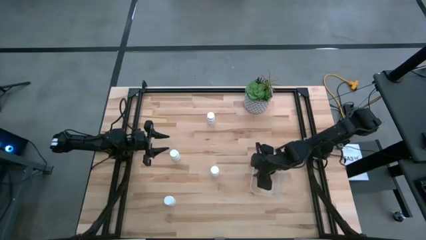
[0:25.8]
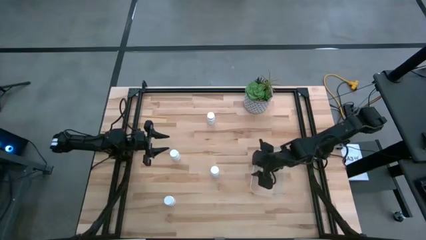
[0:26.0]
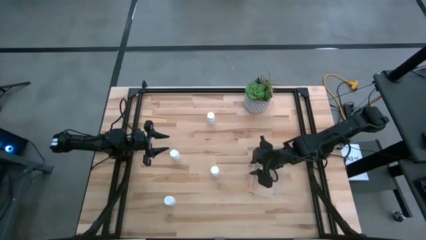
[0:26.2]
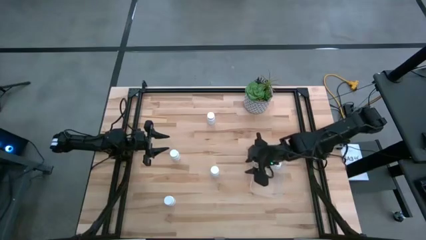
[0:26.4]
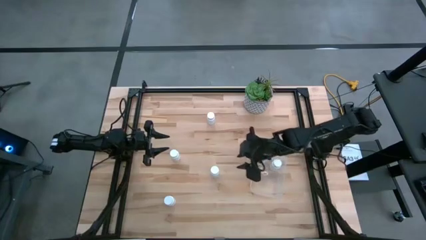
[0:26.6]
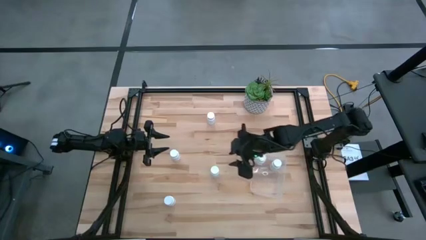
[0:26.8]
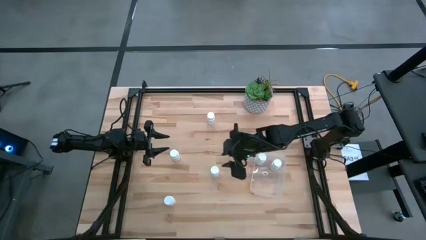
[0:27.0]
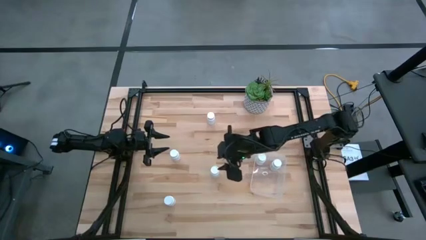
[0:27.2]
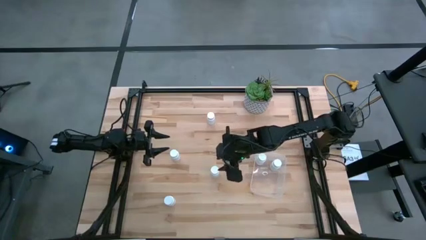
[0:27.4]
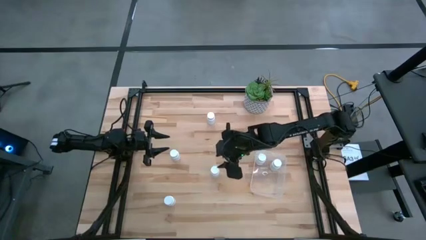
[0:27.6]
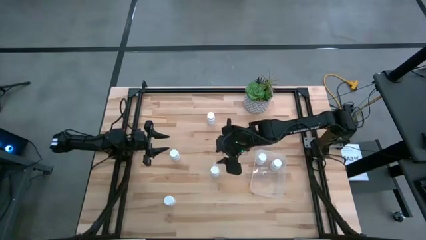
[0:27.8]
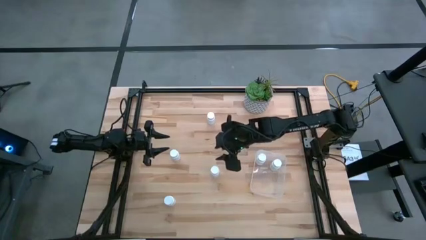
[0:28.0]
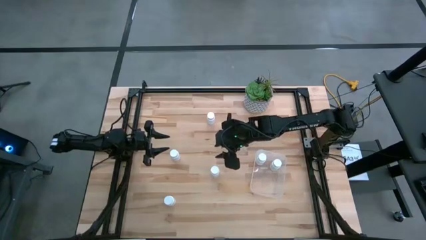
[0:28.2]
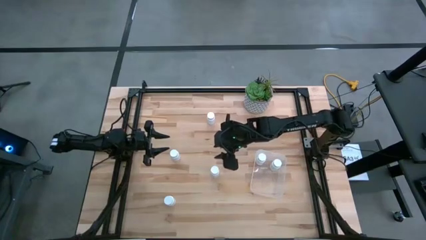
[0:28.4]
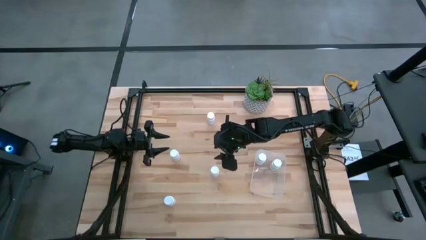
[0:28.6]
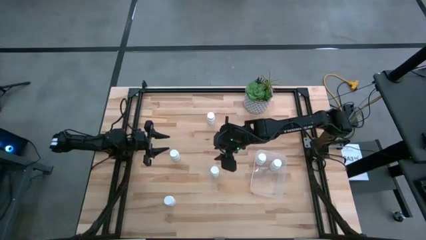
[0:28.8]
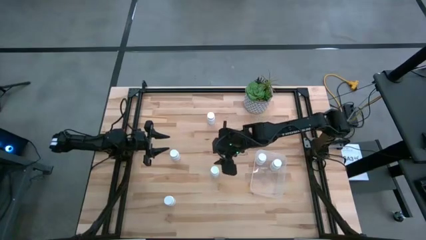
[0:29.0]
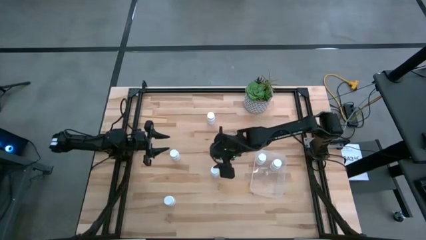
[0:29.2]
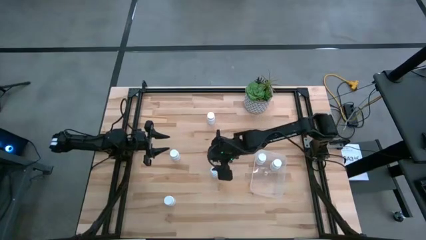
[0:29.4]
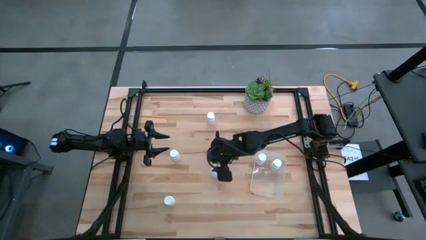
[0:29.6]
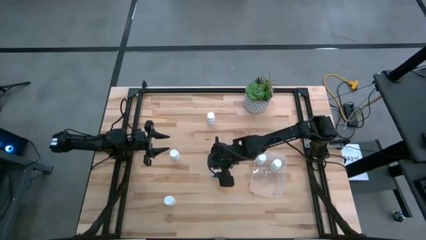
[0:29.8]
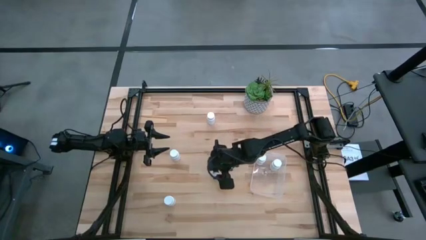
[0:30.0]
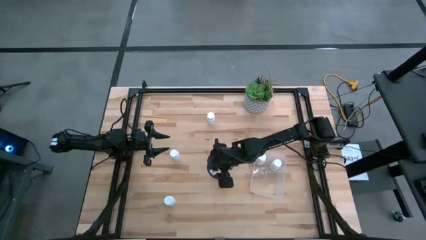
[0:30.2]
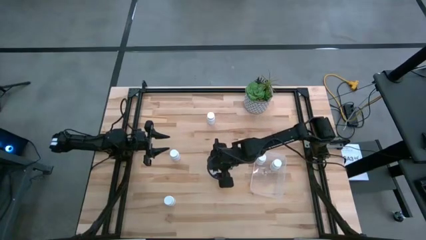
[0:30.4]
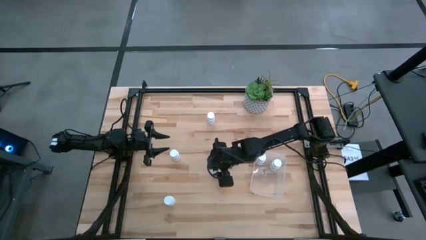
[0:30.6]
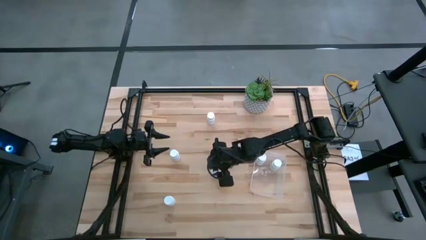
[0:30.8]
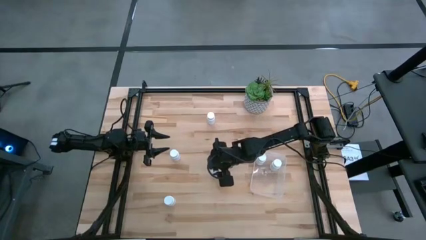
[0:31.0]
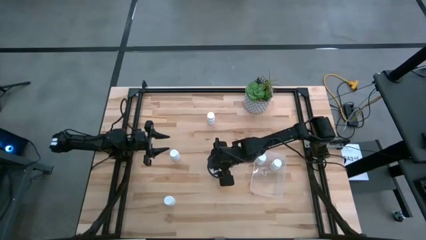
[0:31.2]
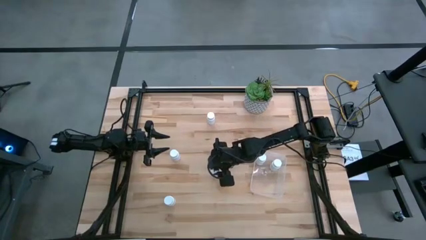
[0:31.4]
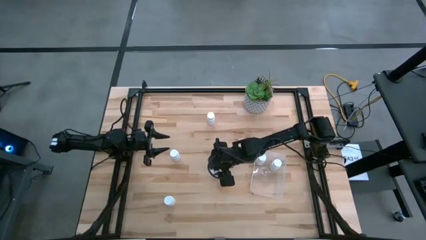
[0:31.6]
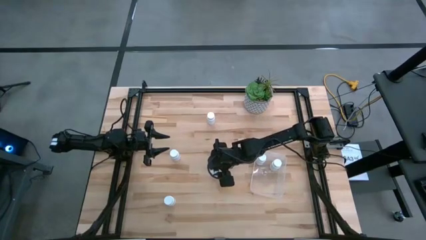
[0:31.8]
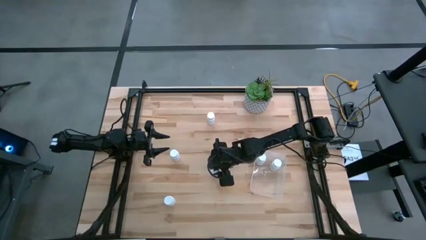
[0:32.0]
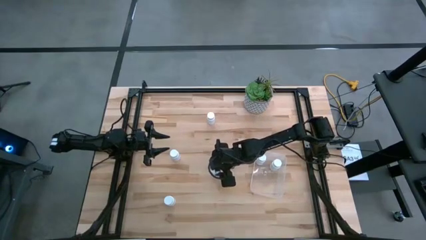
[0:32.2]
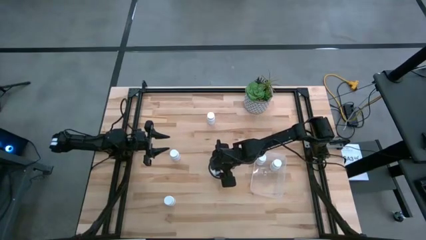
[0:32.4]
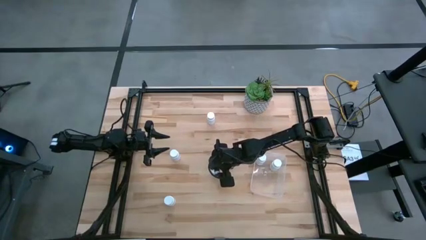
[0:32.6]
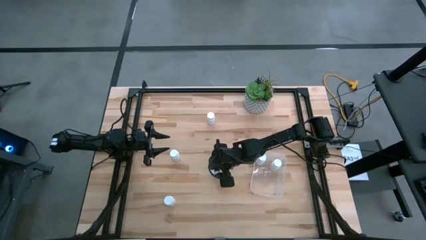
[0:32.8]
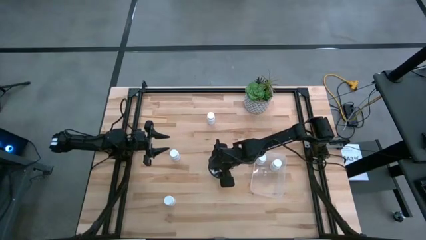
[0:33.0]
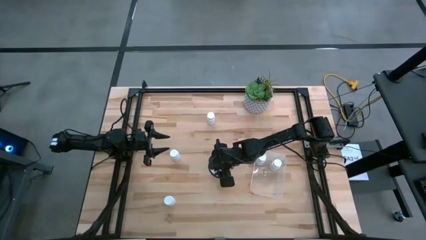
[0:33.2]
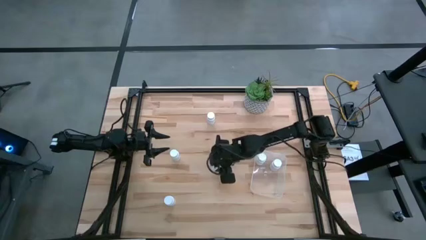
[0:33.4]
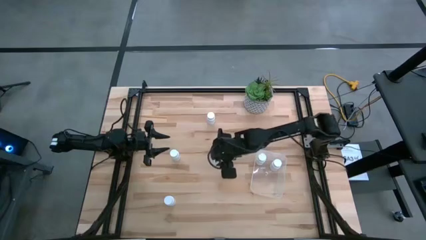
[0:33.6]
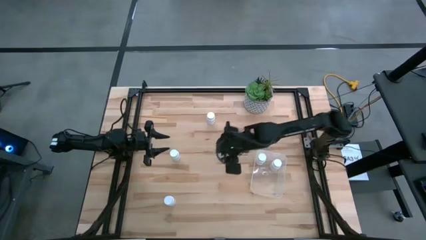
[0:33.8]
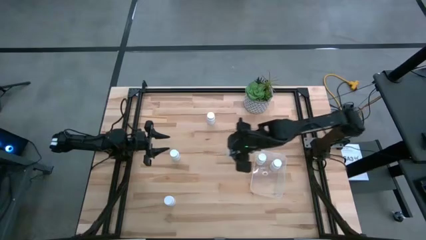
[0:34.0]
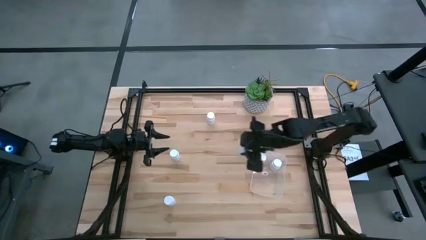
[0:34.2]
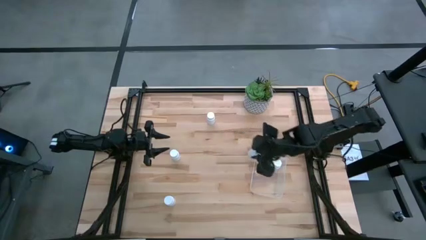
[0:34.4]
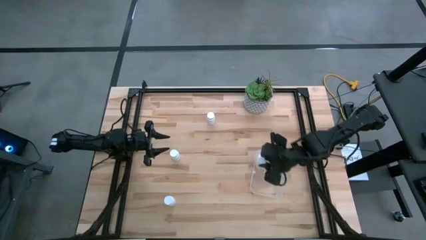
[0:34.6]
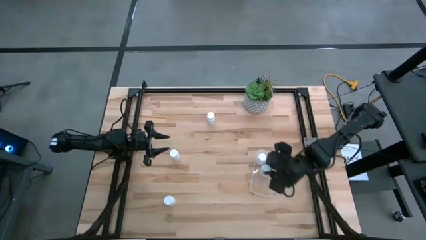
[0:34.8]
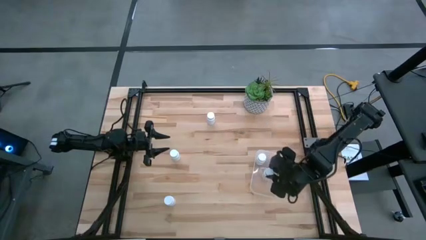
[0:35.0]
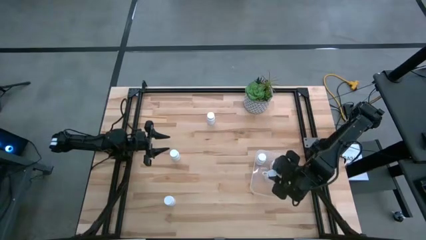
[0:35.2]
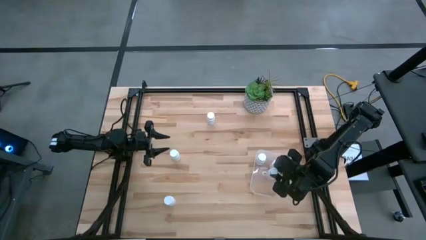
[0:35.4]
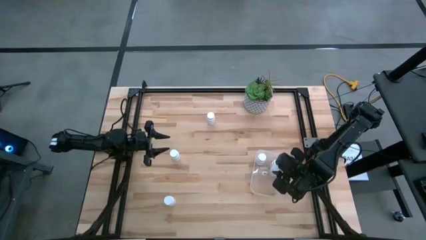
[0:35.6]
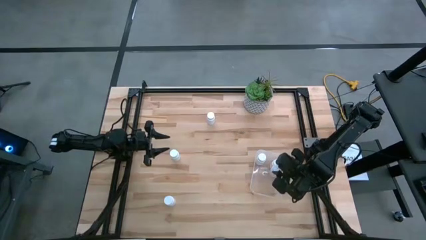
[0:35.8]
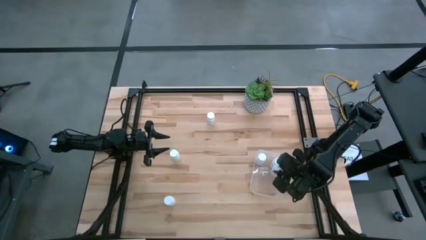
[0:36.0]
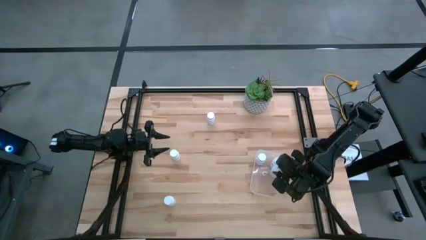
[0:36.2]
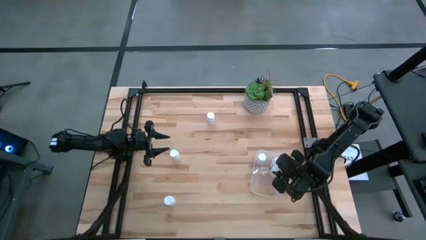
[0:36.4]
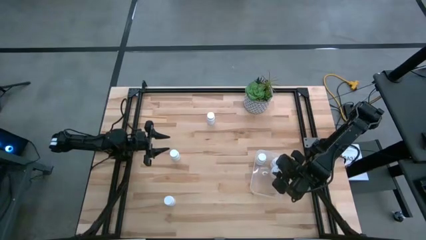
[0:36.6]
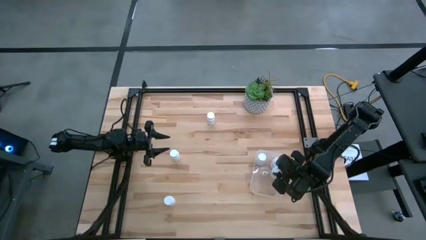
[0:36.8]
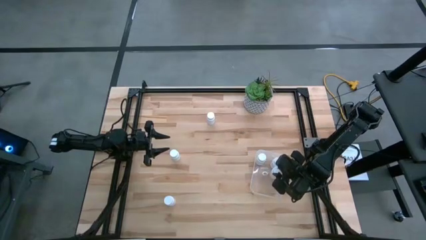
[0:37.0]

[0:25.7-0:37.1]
Task: Pick and place pill bottles into a basket
Put the white medicine bottle into the transparent bin

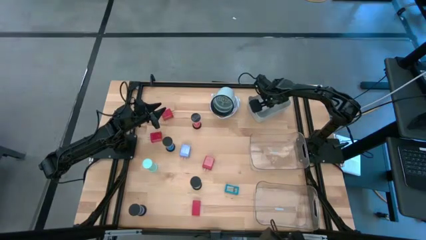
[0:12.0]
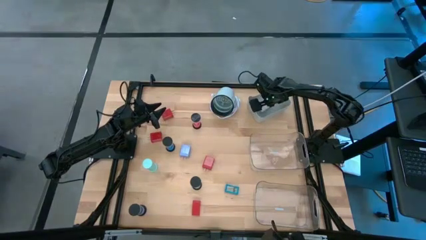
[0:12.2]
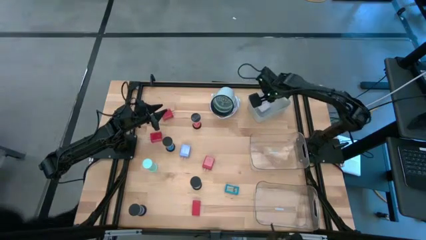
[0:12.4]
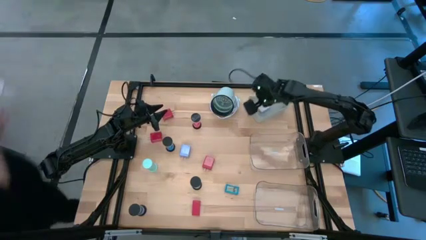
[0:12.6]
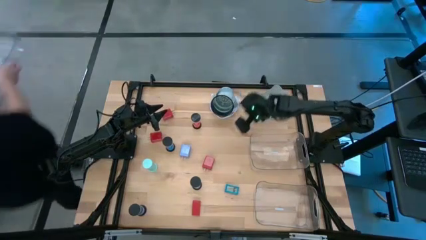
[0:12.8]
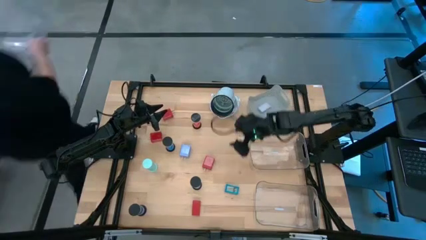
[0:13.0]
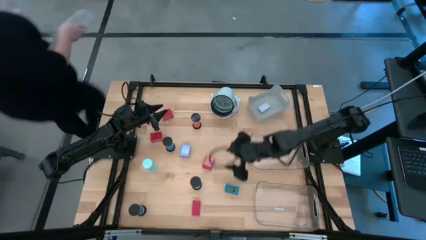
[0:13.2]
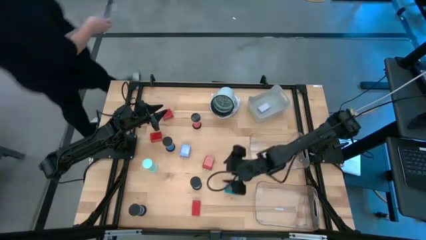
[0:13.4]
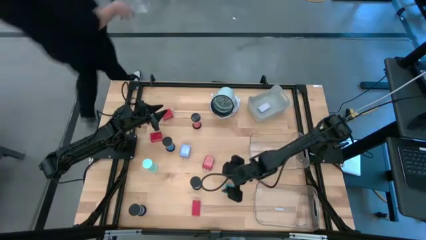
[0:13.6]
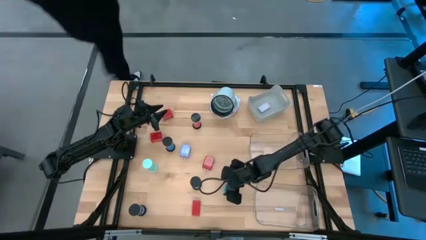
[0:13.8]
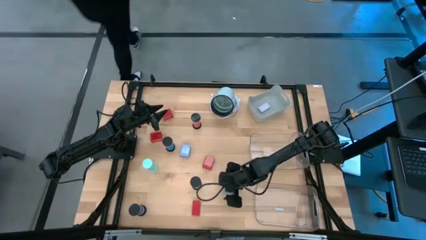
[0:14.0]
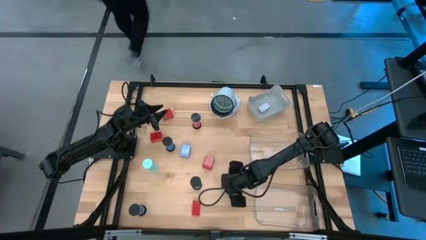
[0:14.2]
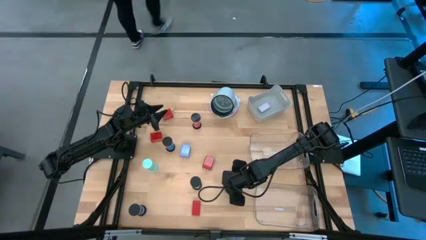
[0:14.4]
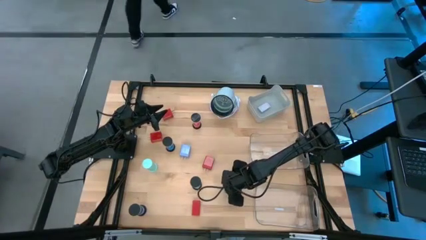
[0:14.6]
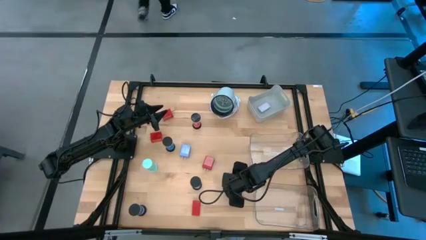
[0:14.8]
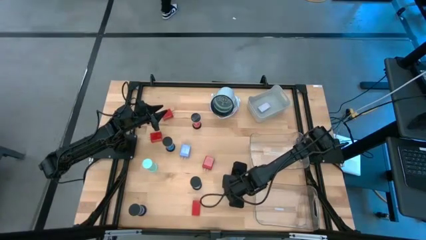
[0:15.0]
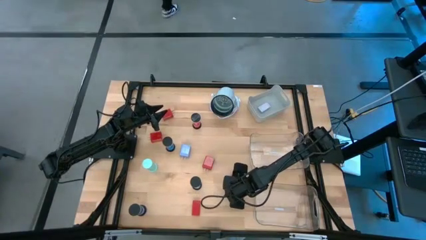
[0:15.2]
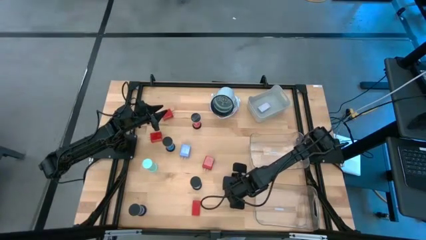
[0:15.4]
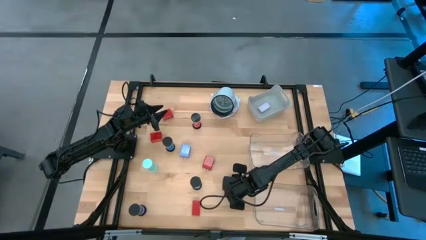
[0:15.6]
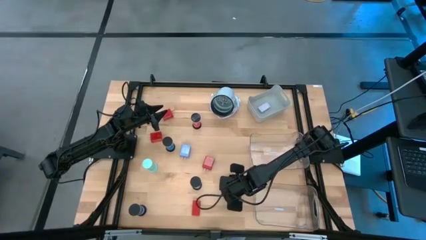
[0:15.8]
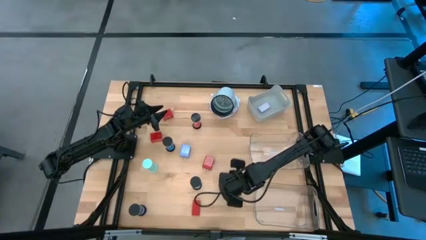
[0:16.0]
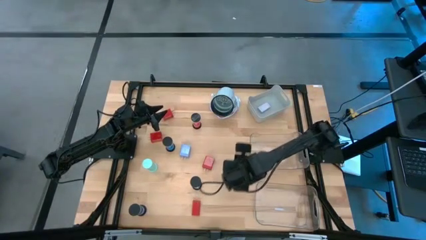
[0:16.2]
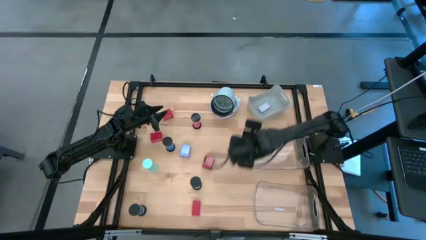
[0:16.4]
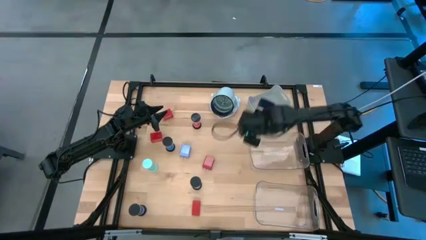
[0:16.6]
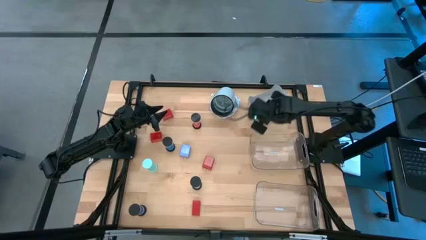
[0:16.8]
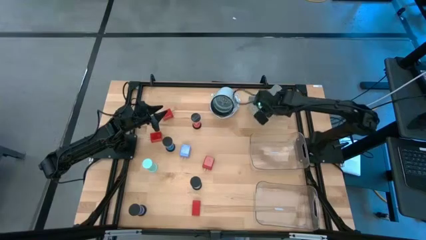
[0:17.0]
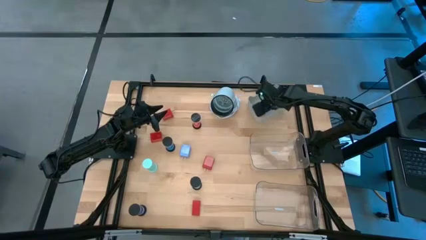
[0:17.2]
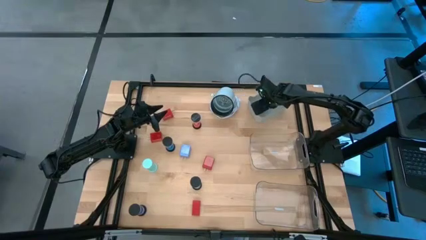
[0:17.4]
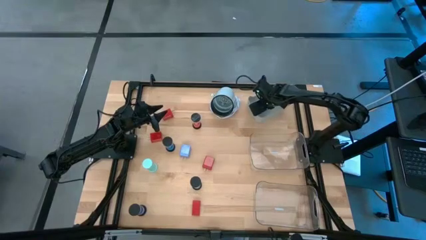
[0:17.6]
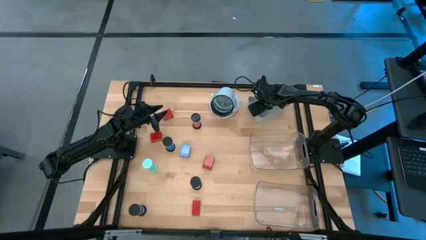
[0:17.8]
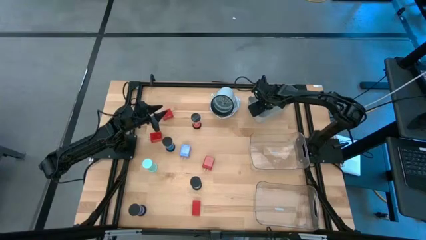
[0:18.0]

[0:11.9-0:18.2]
Task: Pick & Place Office items
Put the blue digital clock into the gray bin
